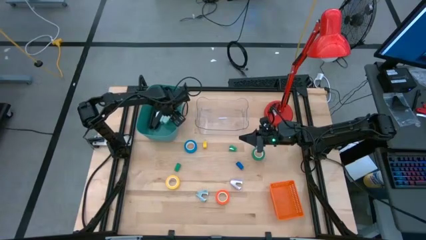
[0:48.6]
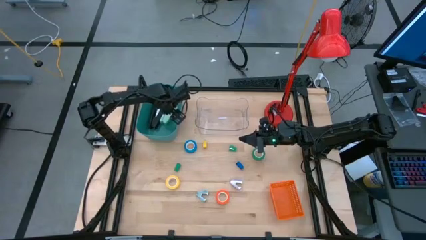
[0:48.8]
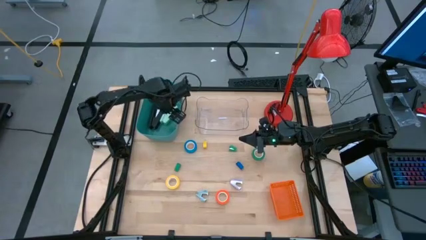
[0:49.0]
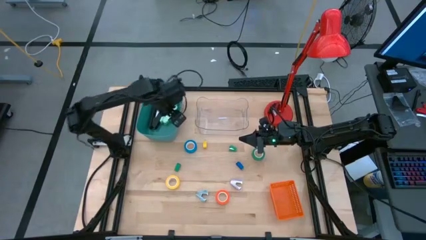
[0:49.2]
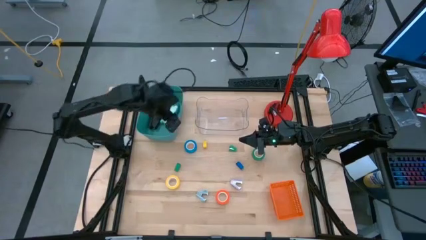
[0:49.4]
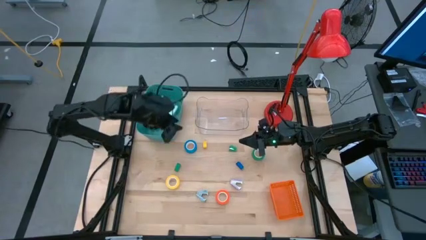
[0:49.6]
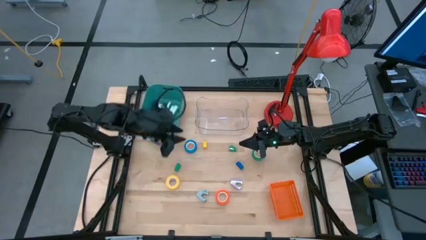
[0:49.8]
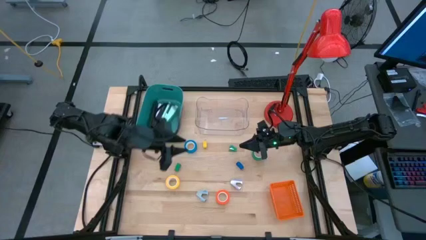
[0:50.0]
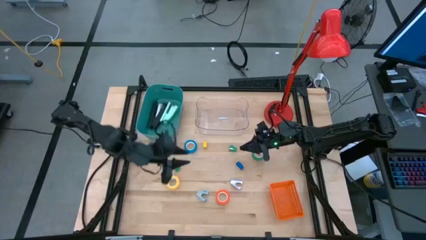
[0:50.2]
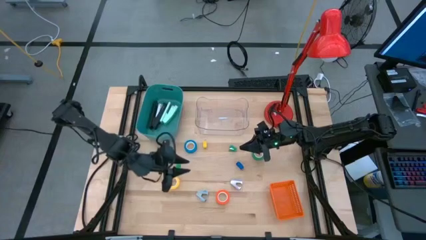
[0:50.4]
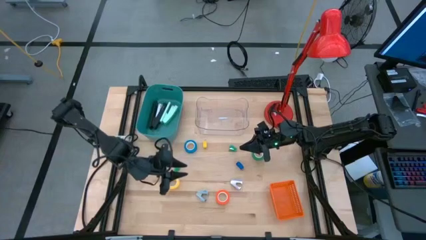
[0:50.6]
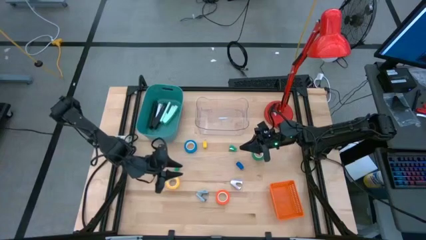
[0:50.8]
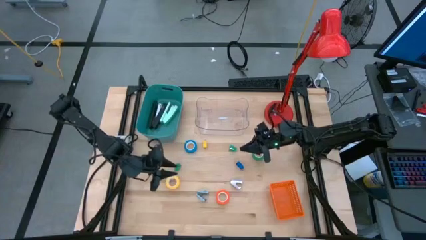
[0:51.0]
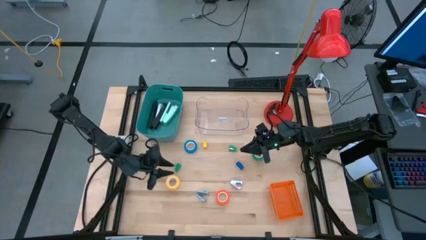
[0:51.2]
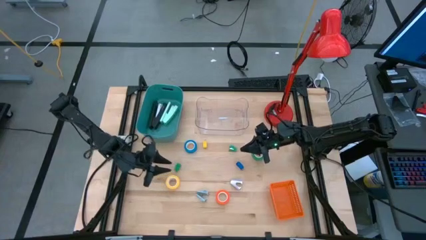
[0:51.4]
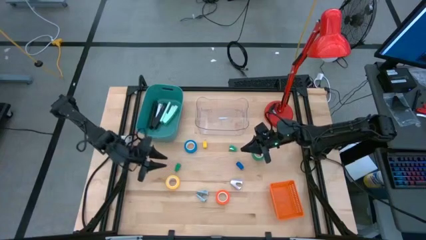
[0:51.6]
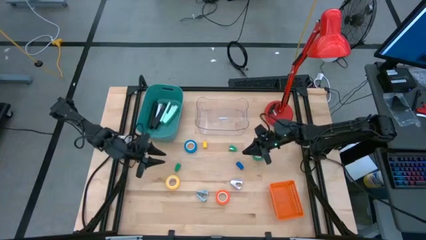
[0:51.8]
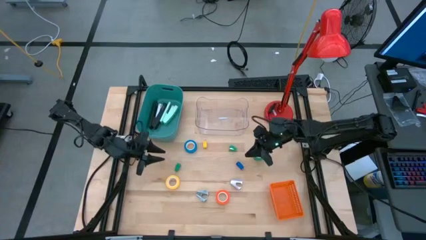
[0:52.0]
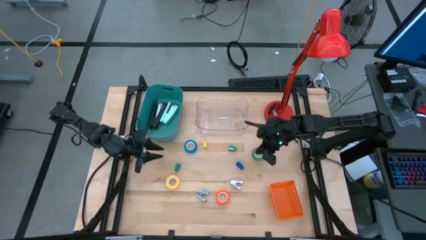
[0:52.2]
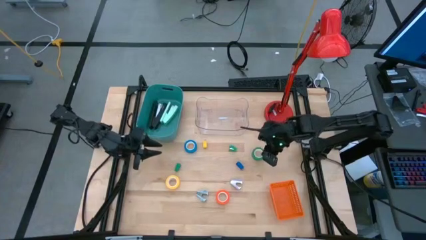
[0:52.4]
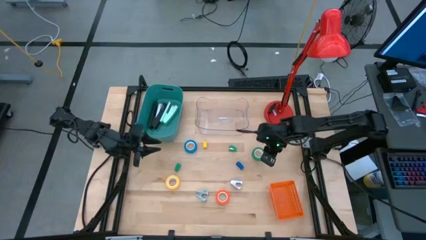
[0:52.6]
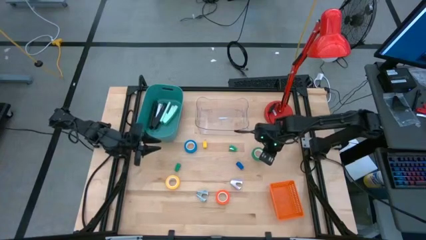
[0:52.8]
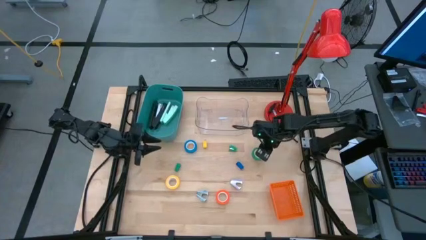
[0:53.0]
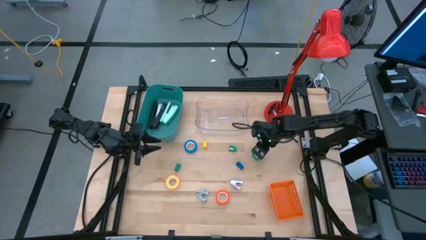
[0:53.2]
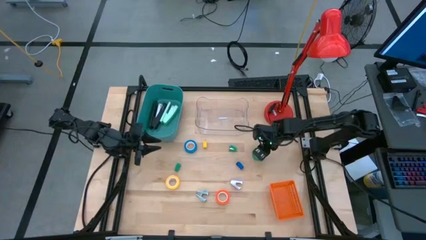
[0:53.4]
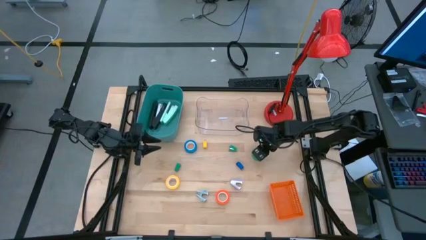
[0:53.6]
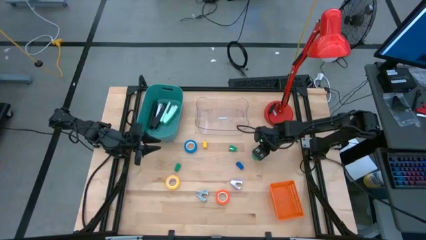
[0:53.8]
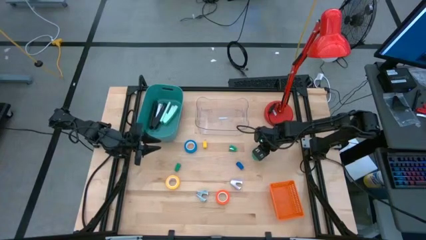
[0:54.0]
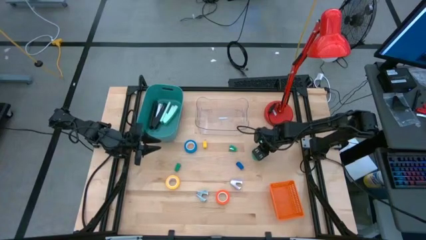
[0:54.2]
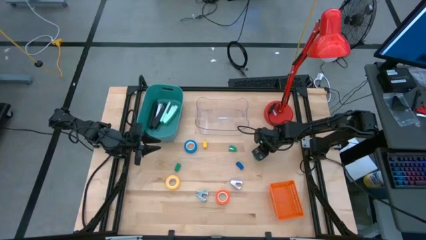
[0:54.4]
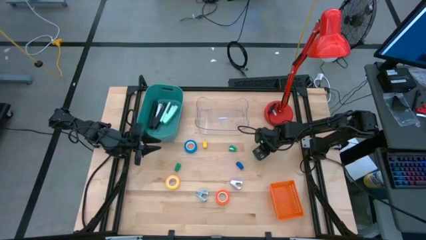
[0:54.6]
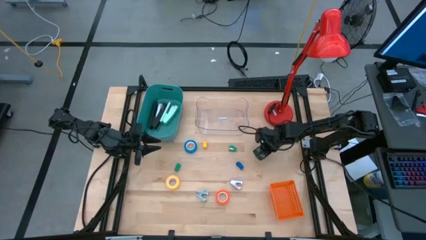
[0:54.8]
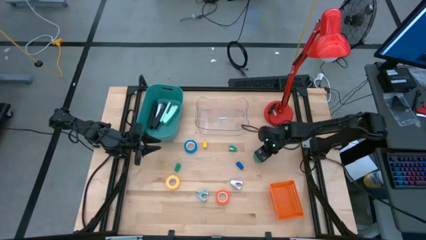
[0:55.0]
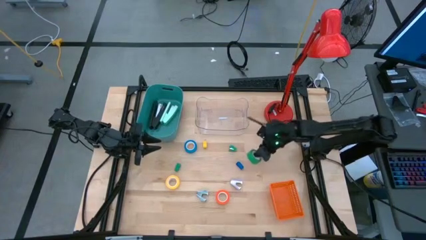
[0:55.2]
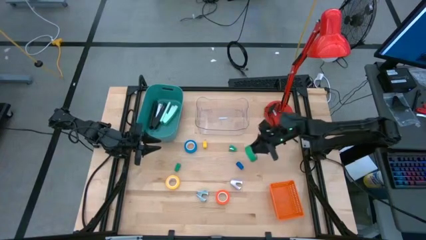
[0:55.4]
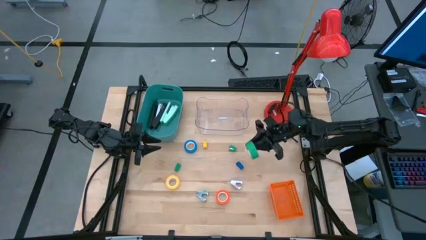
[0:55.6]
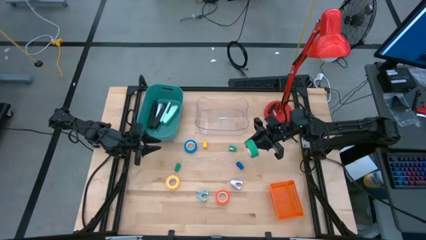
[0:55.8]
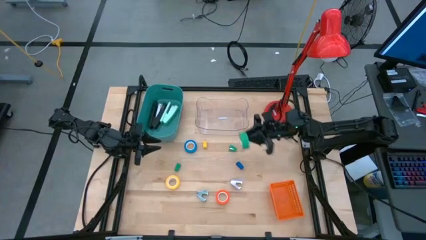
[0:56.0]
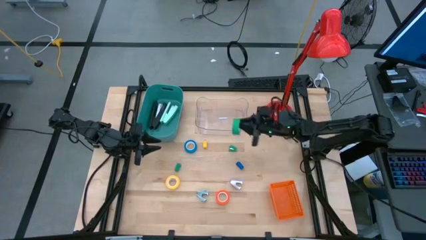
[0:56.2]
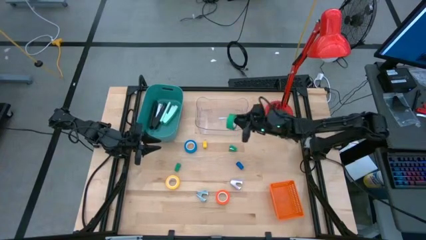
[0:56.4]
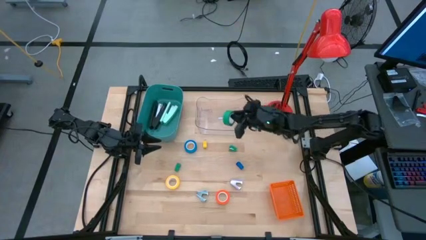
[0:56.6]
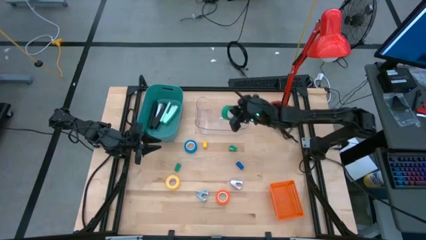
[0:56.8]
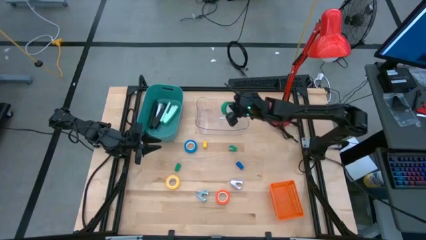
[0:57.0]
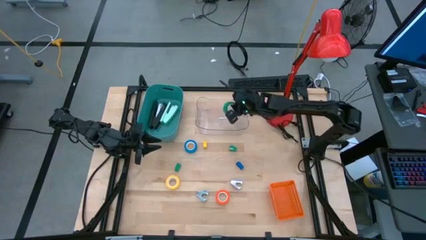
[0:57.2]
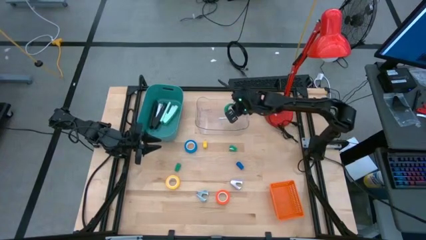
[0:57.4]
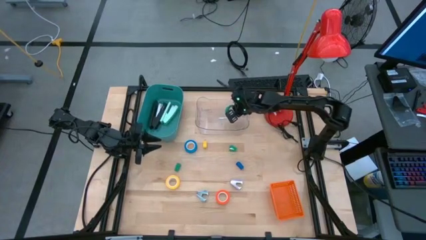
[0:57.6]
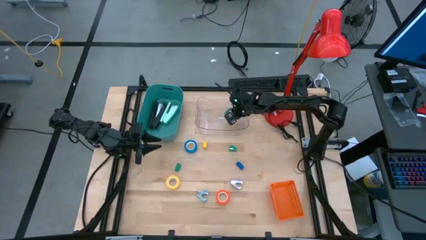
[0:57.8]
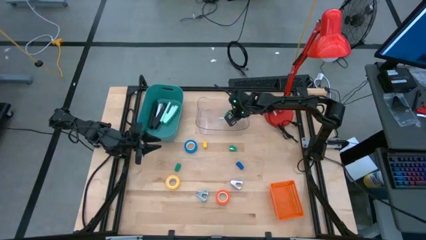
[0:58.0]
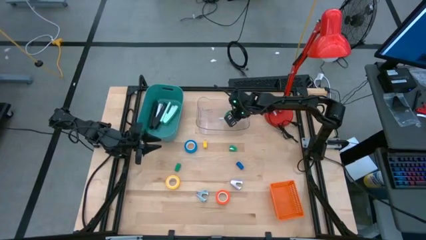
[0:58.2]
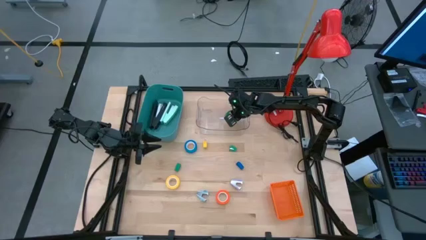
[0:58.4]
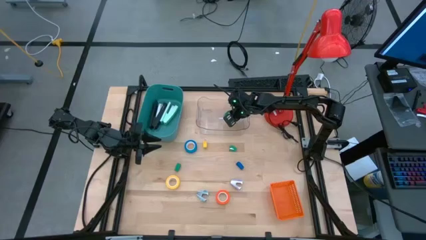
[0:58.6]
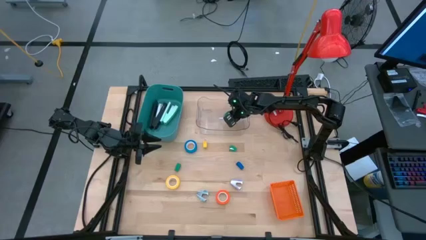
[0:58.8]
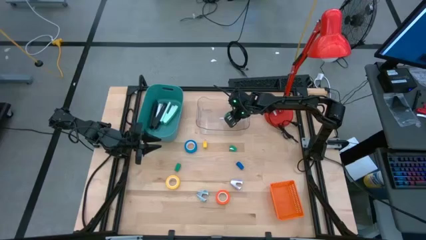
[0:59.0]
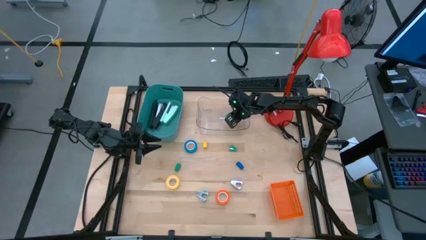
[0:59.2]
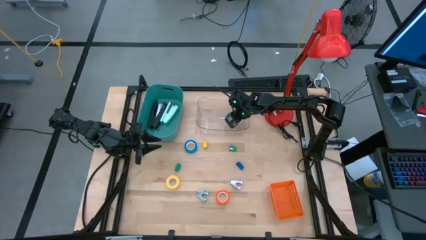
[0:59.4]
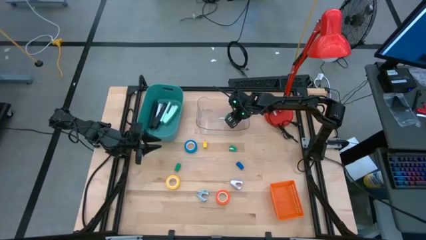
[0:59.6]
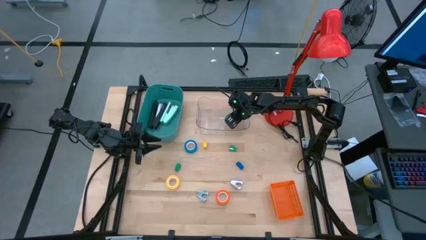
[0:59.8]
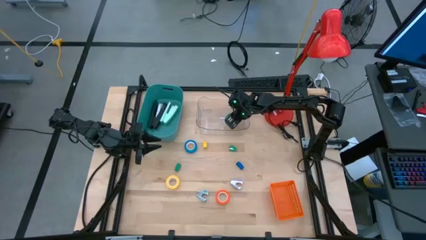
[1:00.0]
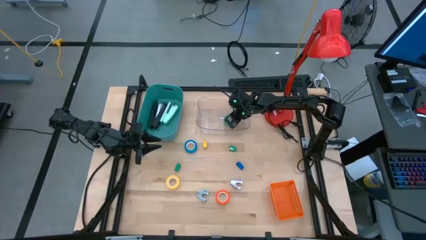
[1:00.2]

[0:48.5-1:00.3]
Task: Pick and place Stapler, Stapler remover, tape
Put the green tape into the transparent bin
